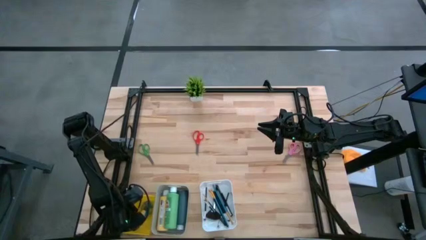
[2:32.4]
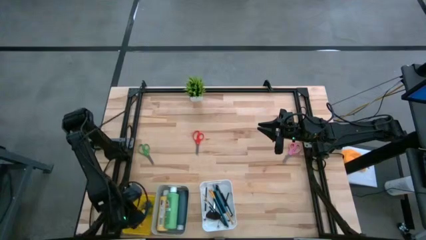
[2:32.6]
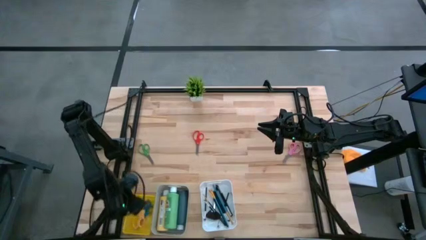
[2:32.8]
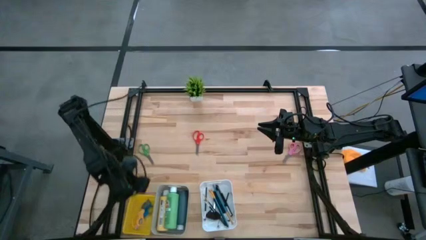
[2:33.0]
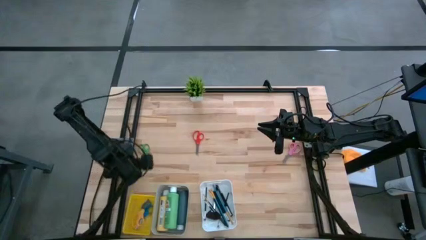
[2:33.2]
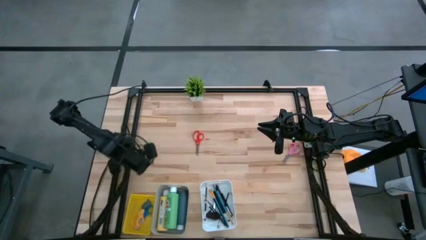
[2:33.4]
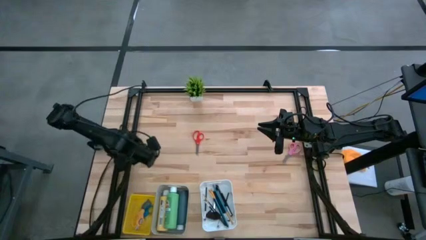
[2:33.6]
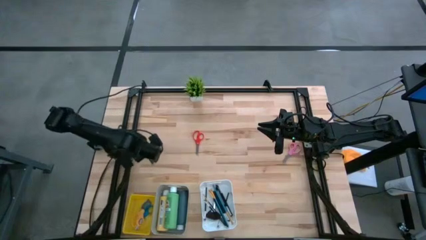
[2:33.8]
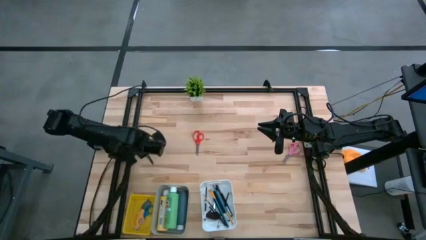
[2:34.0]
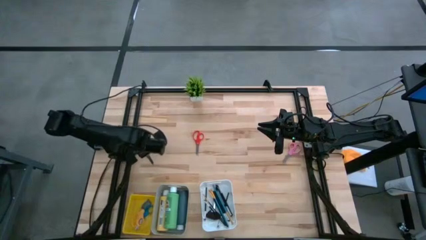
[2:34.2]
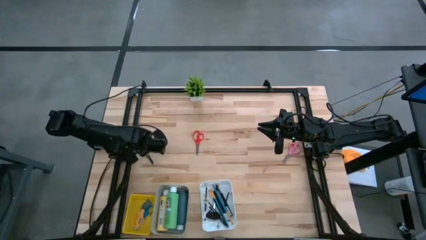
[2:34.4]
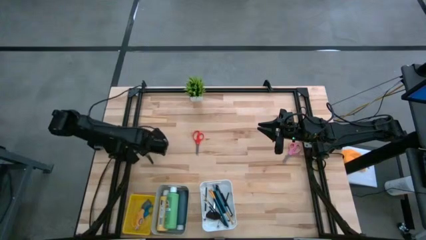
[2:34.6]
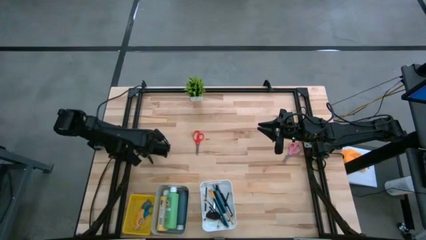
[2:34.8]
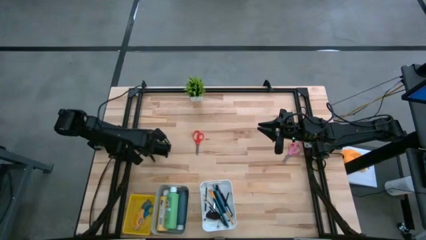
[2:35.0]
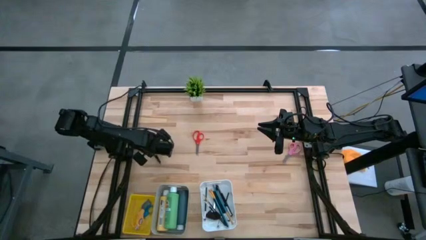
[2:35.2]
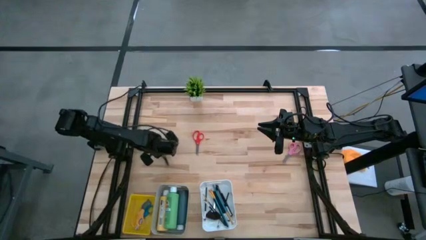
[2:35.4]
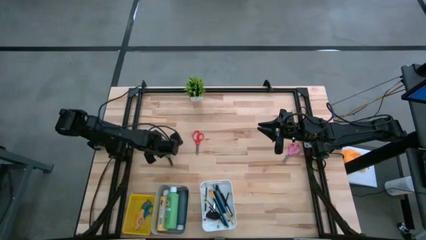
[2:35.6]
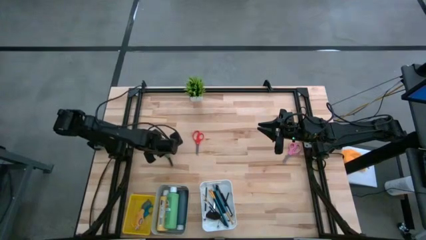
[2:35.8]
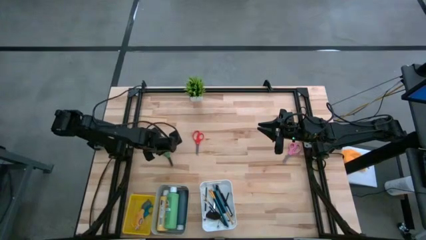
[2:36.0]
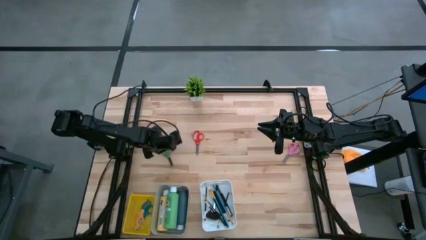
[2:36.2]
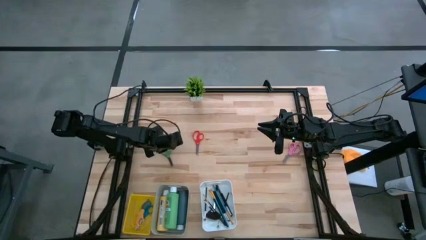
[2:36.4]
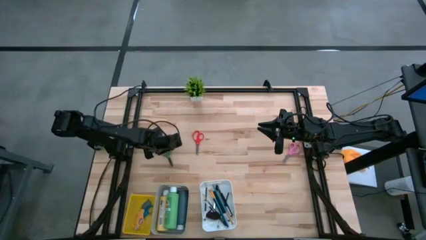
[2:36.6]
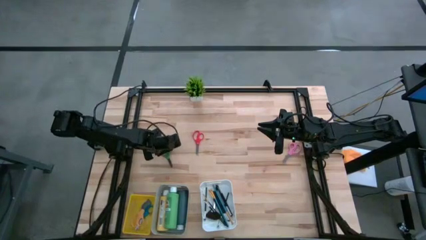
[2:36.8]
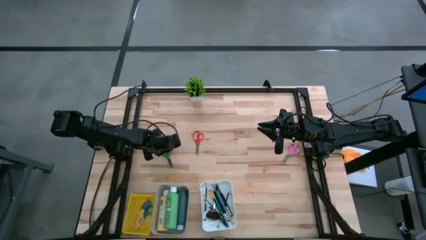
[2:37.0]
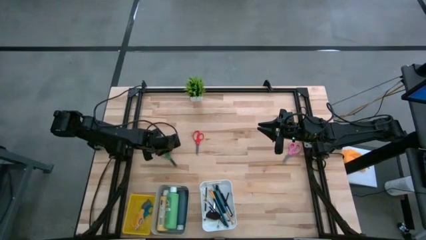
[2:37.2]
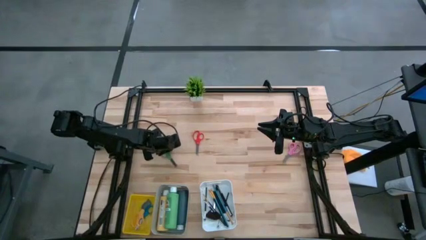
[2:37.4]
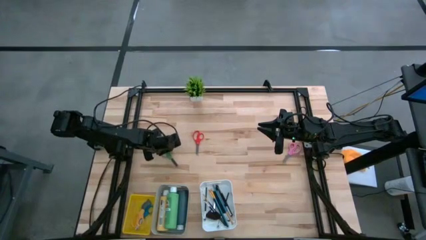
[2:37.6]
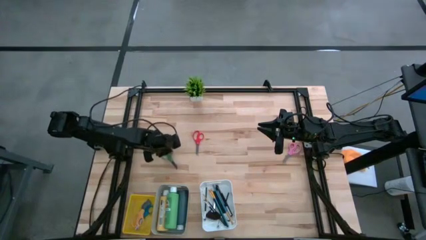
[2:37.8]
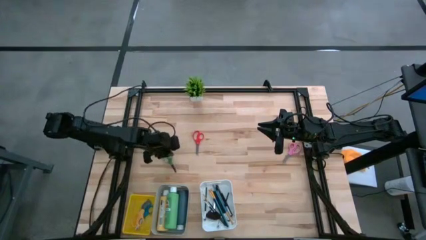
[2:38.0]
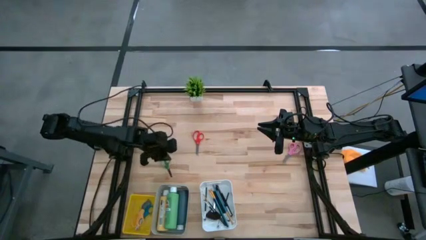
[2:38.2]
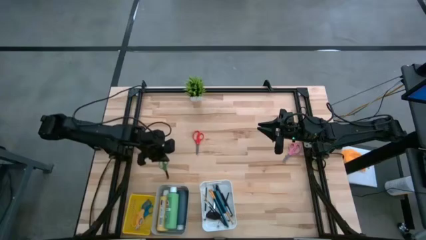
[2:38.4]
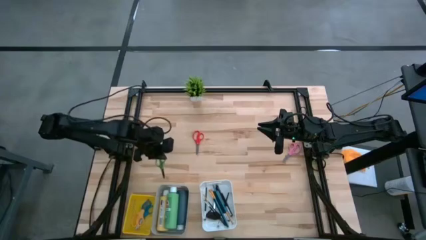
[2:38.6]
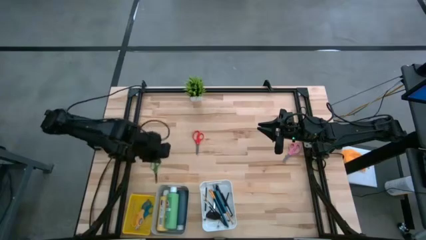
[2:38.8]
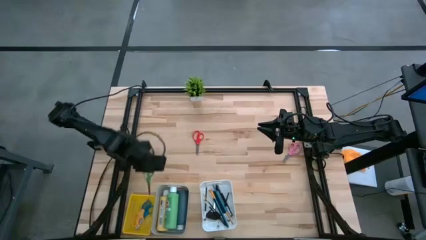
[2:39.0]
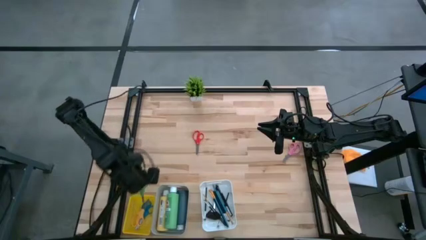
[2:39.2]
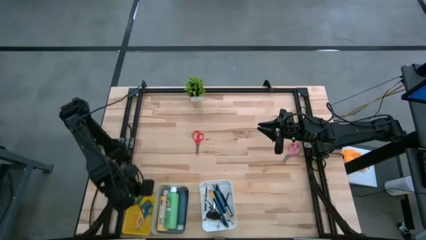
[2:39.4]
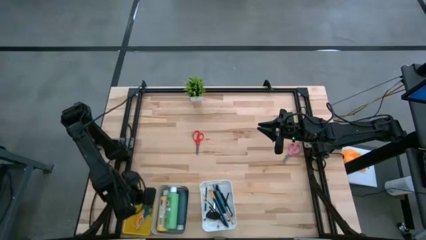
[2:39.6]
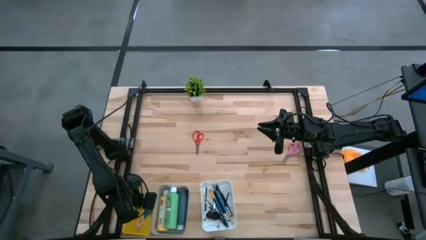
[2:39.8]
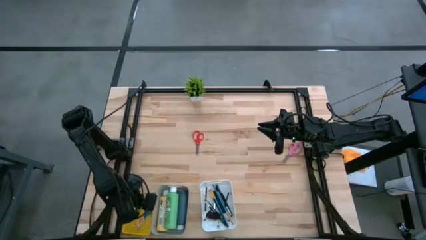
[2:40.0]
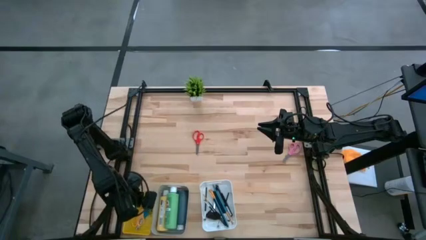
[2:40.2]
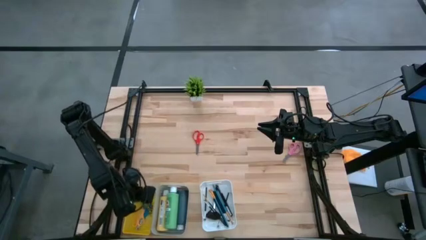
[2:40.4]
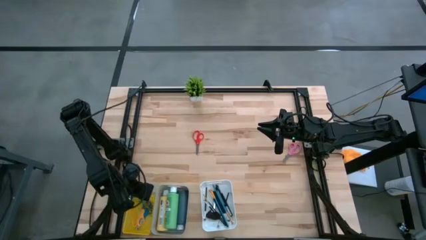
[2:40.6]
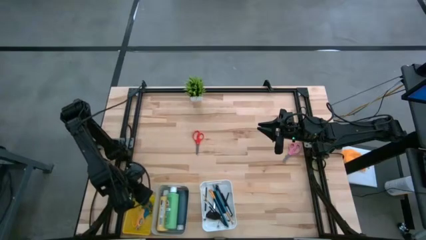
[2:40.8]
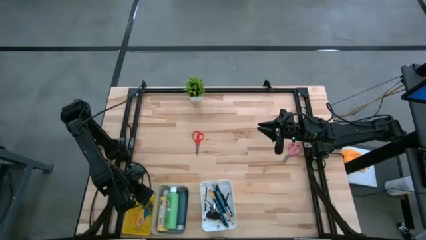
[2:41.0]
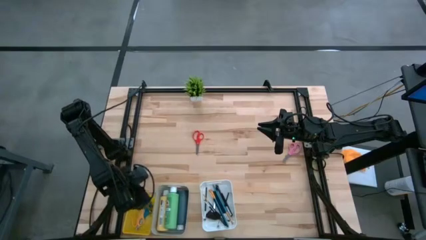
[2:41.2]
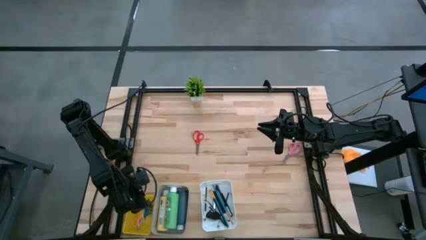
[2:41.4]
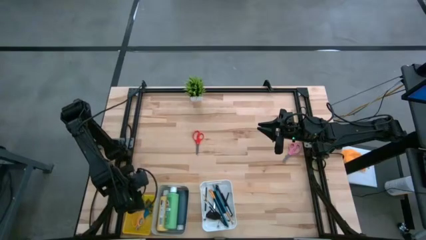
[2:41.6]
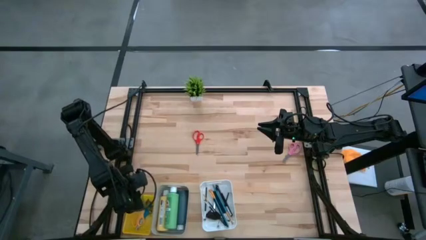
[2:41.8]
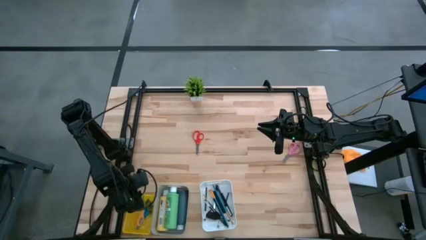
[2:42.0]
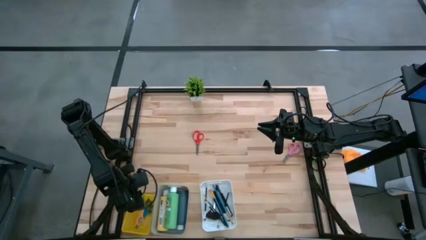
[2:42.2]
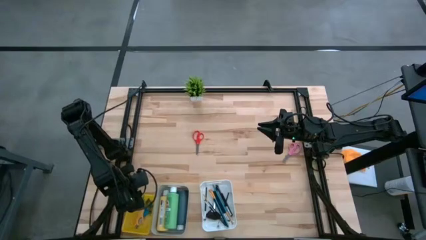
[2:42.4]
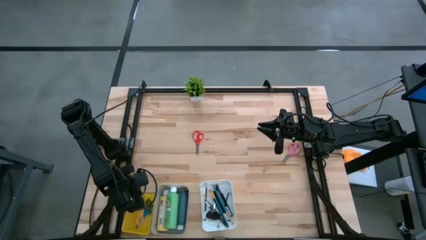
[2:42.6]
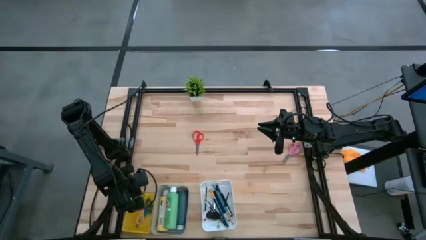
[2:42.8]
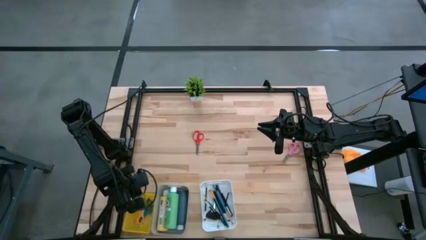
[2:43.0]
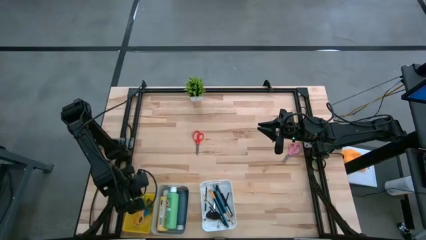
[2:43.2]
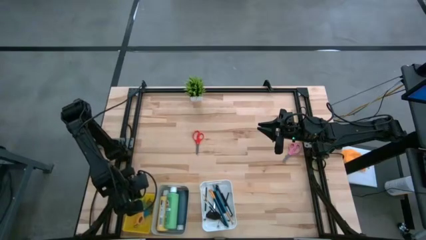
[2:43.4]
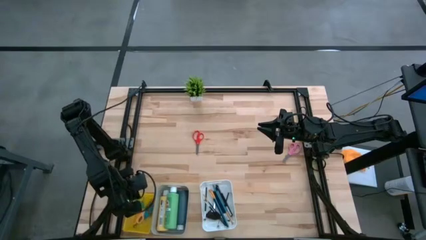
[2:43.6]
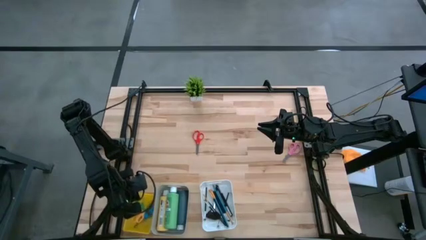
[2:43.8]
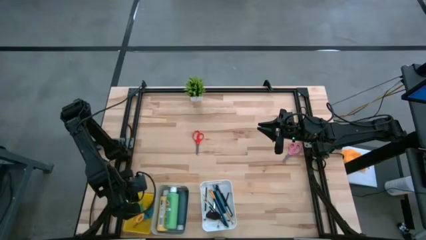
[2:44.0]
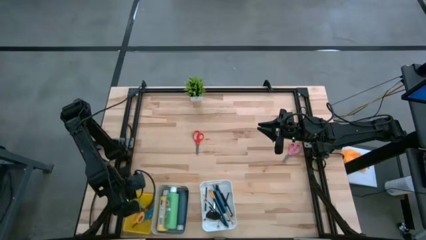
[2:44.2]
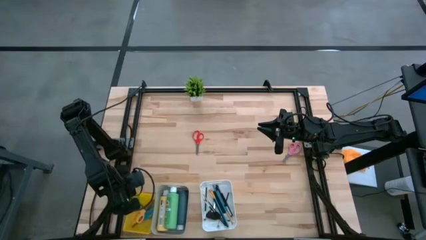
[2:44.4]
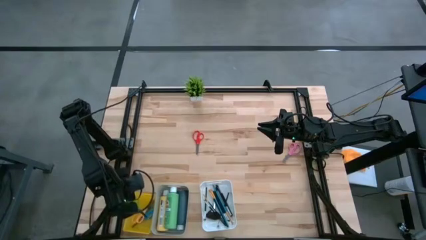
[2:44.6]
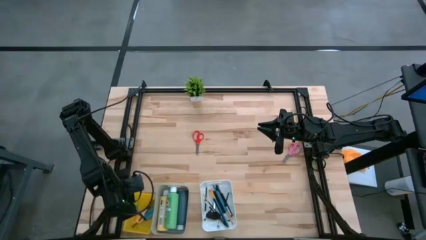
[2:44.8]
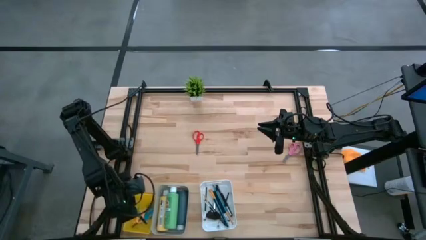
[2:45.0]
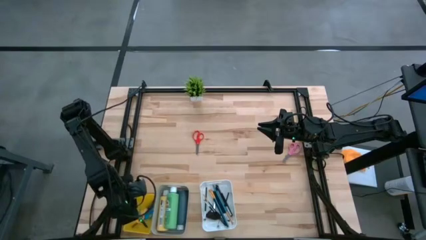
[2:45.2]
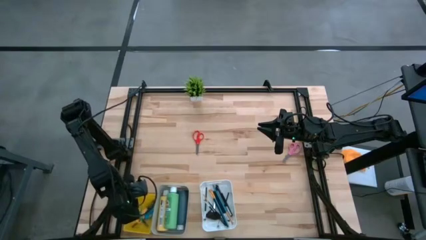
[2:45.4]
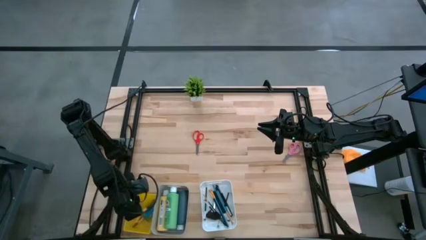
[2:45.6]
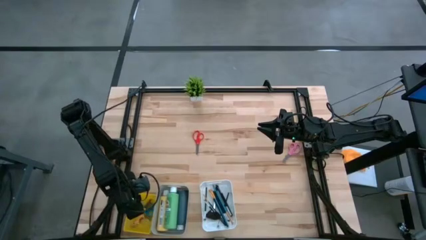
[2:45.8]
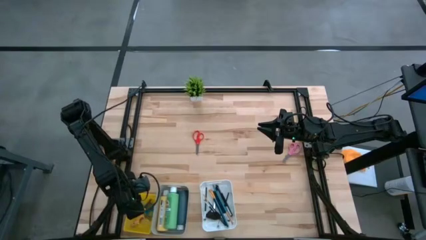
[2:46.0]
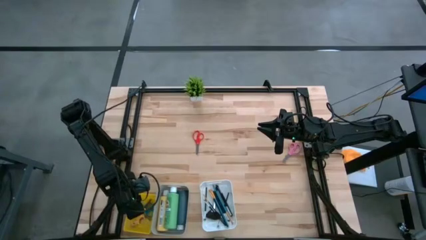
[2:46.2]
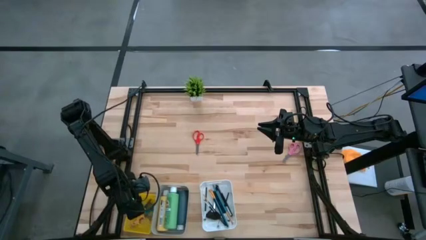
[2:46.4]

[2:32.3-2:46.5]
Task: Pick & Place Paint Supplies
Put the green scissors into the yellow bin

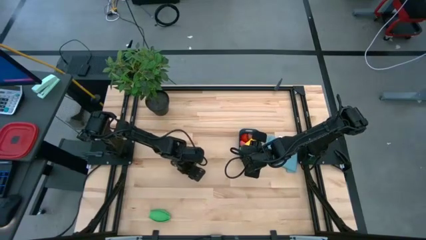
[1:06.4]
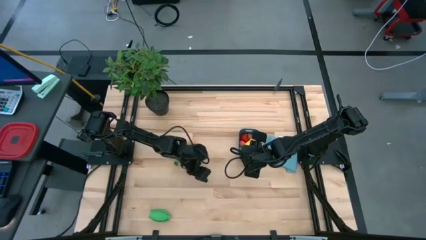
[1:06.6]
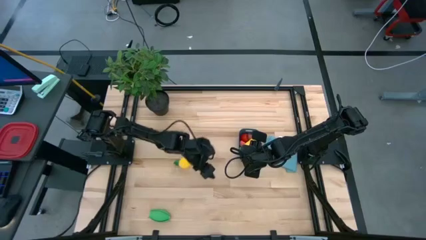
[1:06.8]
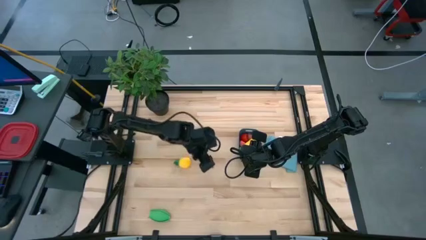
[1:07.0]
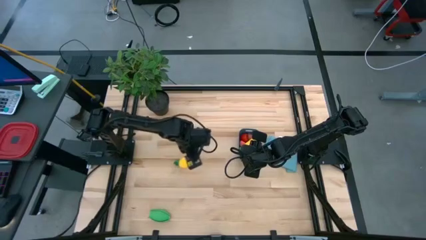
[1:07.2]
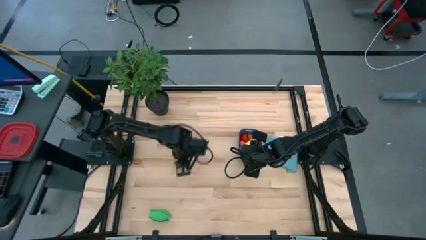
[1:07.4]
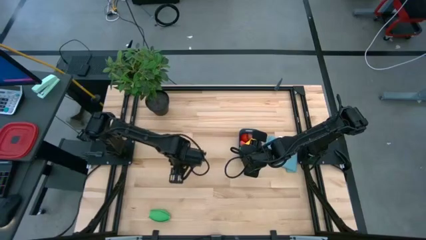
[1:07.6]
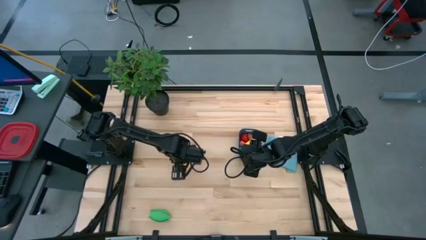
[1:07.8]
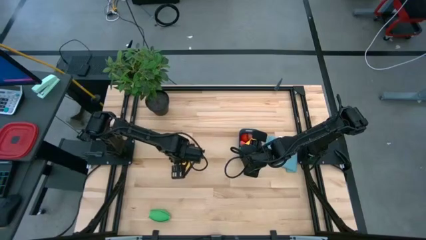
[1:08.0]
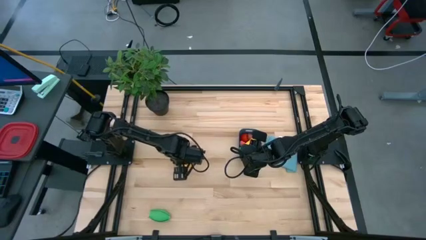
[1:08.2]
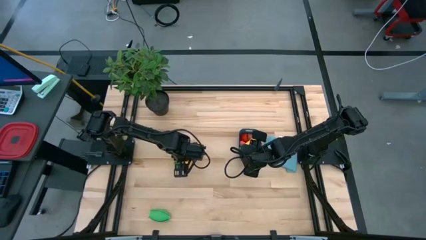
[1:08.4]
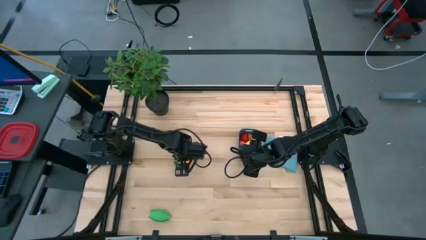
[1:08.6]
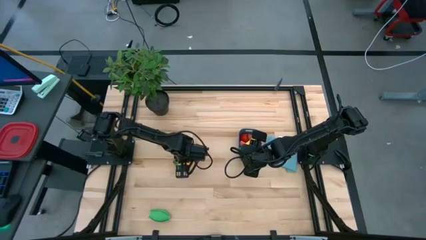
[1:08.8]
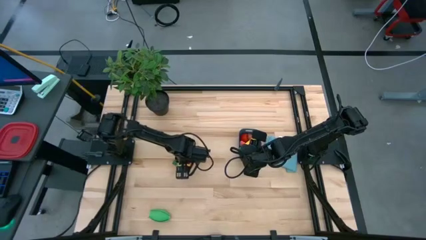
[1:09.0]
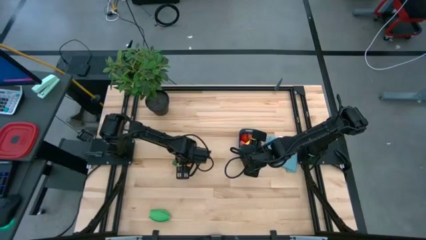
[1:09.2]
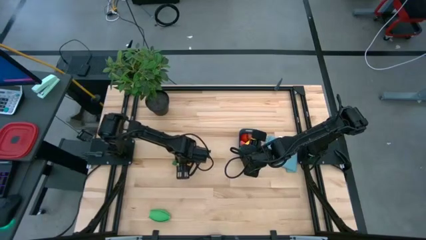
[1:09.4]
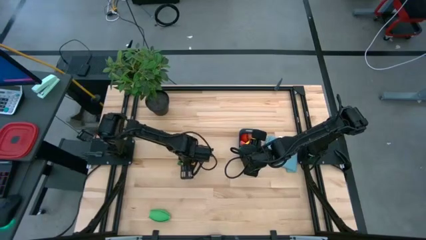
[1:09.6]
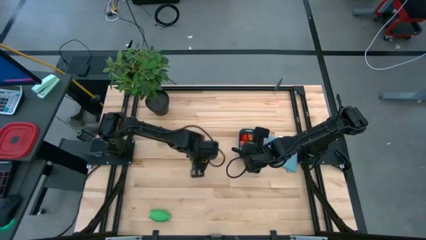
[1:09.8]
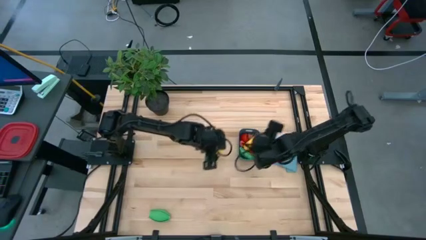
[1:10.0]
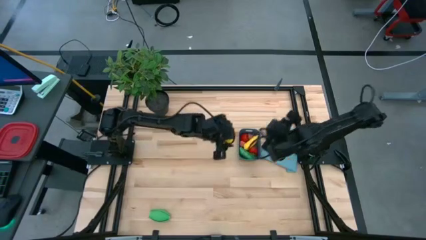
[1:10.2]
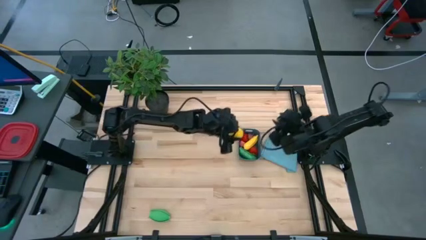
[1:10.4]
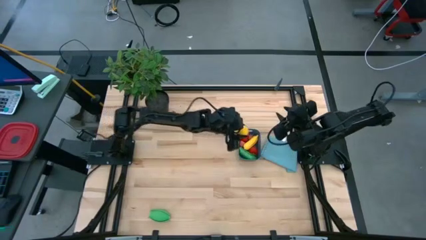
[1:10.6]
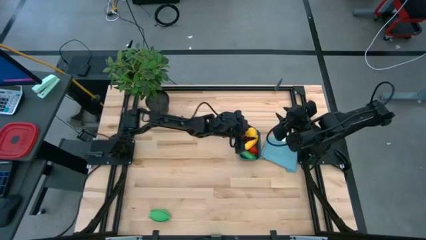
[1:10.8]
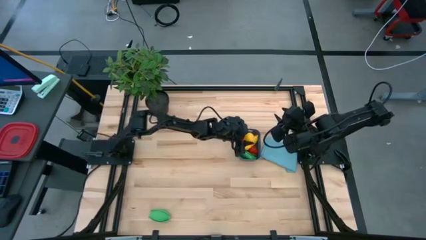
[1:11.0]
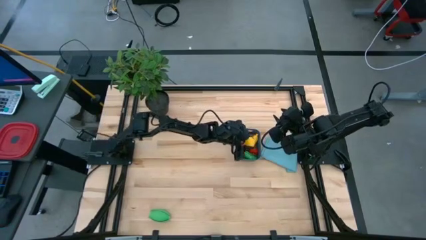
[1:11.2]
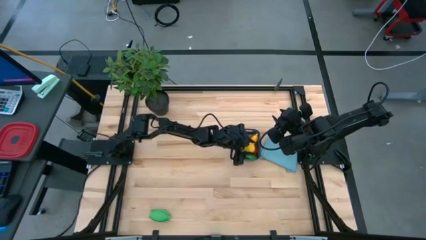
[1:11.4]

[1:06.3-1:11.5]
Task: Pick and placing Produce into tupperware
Put the yellow pineapple into the blue bin
